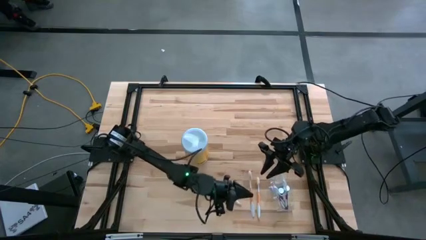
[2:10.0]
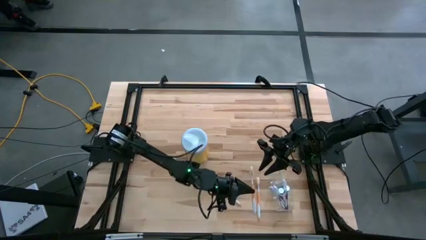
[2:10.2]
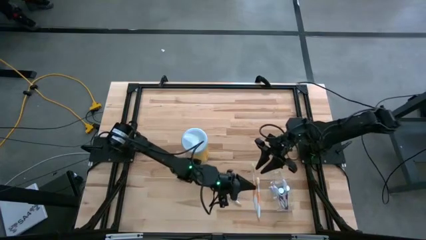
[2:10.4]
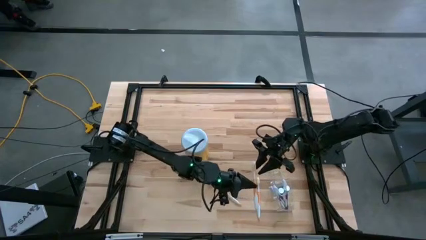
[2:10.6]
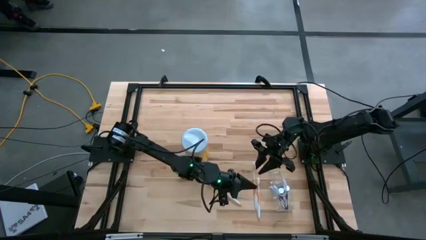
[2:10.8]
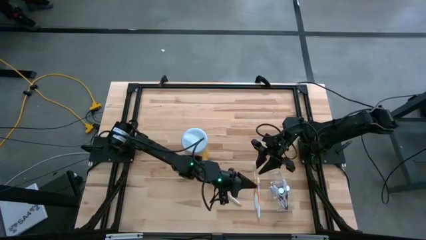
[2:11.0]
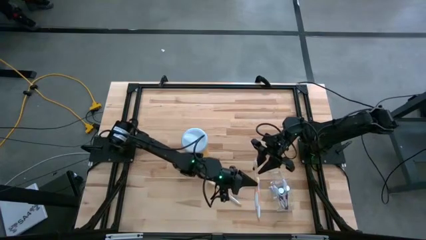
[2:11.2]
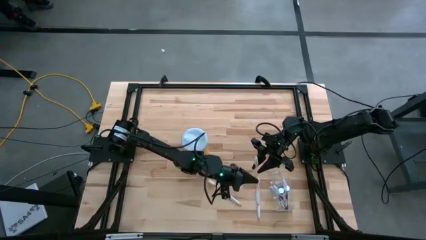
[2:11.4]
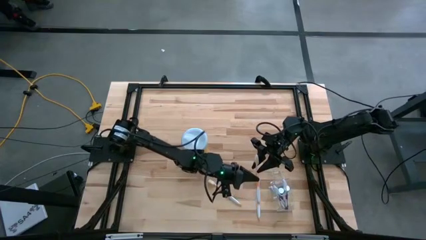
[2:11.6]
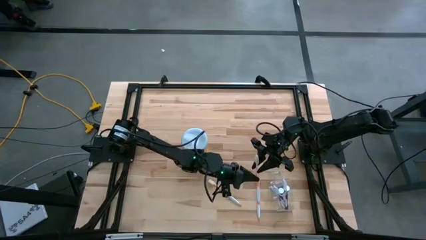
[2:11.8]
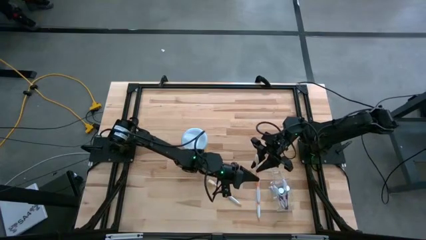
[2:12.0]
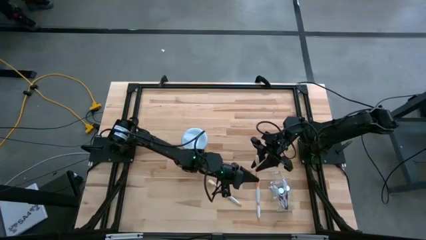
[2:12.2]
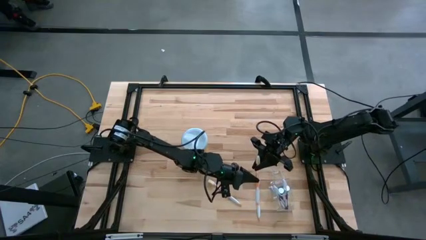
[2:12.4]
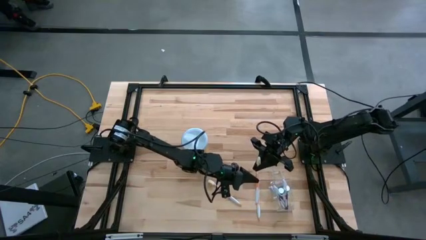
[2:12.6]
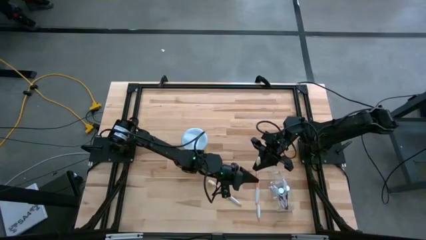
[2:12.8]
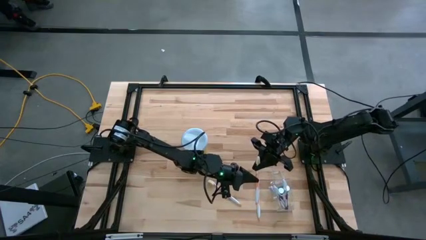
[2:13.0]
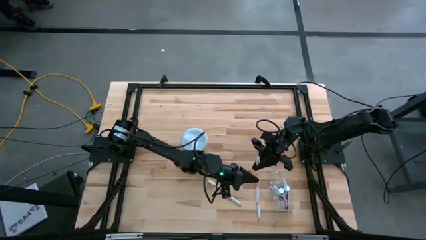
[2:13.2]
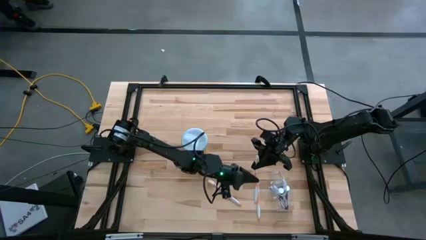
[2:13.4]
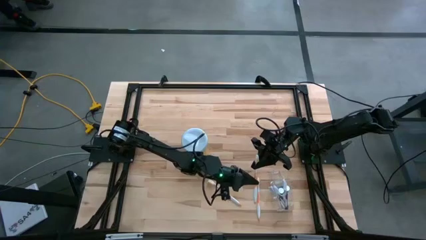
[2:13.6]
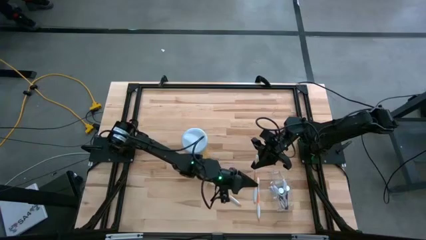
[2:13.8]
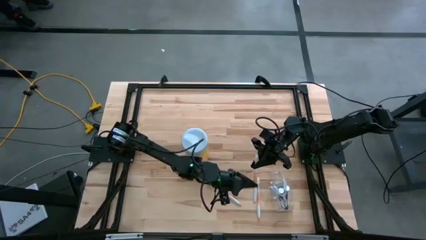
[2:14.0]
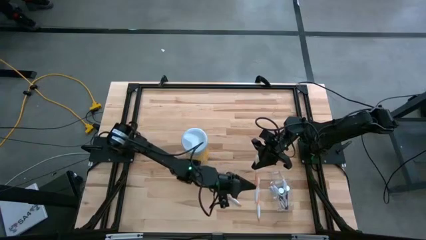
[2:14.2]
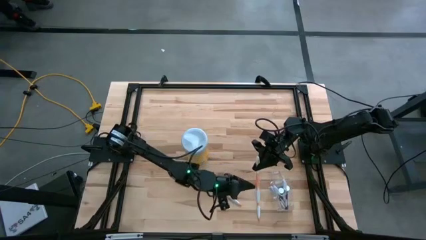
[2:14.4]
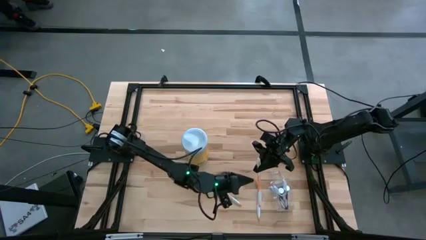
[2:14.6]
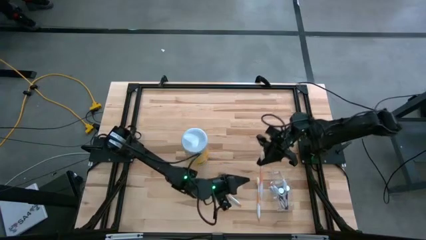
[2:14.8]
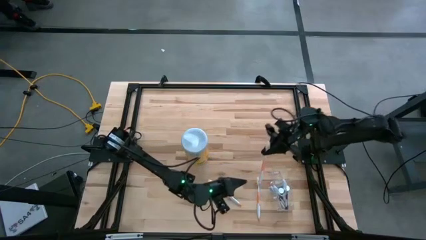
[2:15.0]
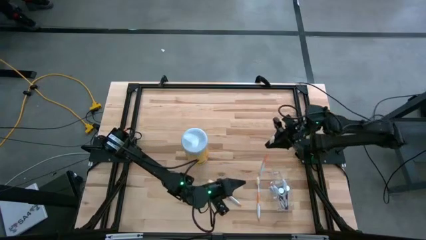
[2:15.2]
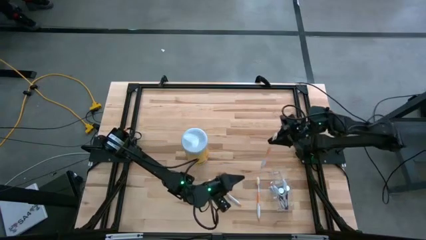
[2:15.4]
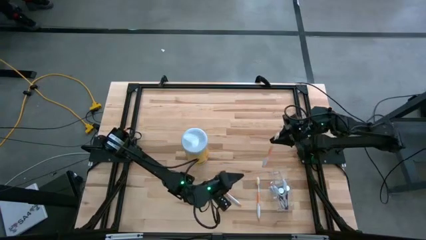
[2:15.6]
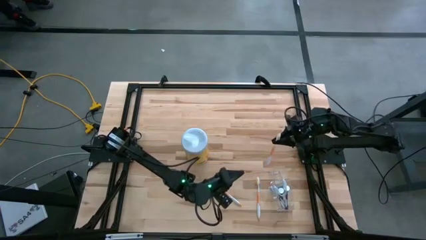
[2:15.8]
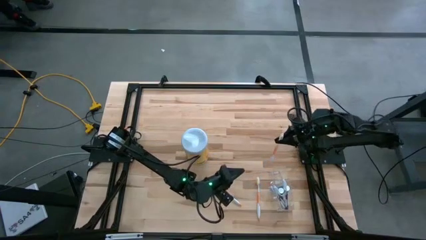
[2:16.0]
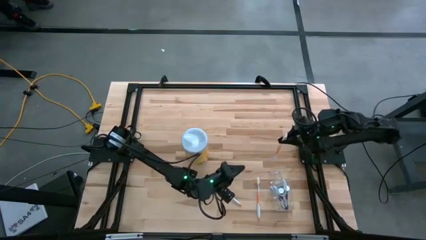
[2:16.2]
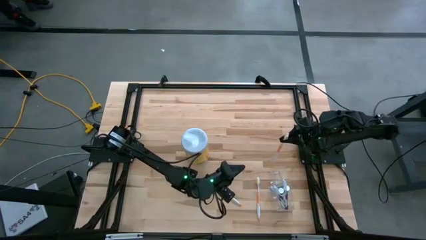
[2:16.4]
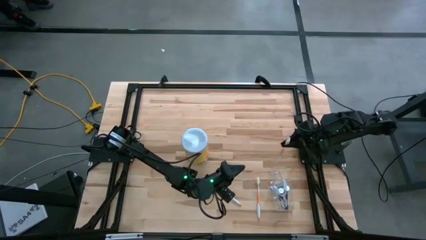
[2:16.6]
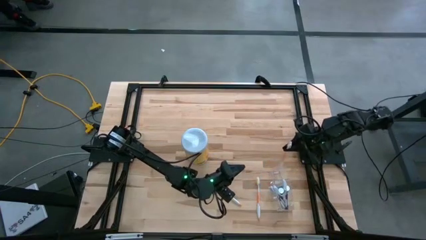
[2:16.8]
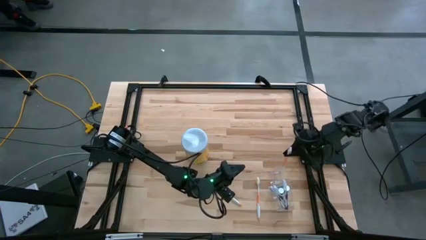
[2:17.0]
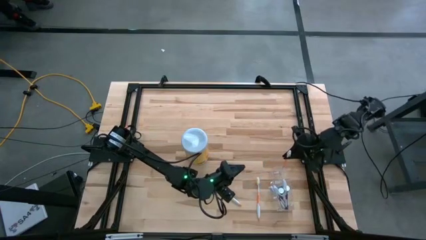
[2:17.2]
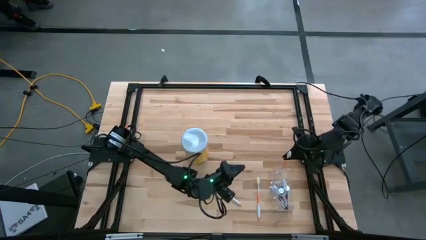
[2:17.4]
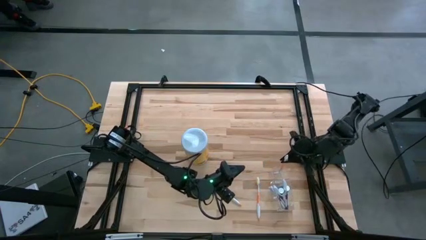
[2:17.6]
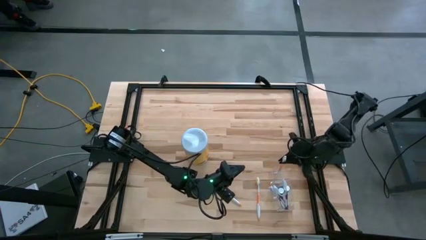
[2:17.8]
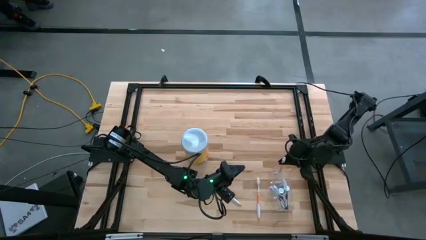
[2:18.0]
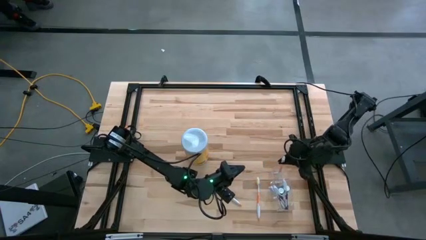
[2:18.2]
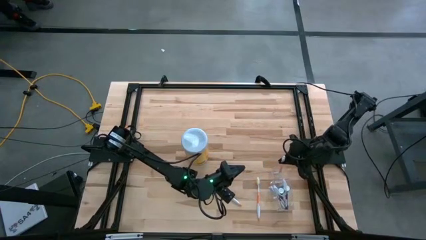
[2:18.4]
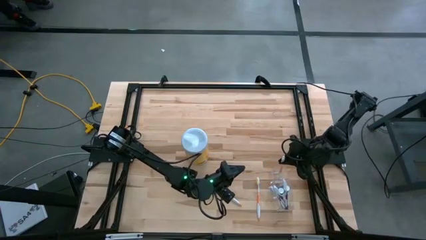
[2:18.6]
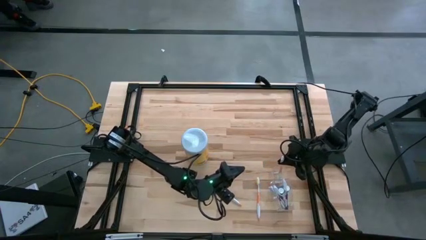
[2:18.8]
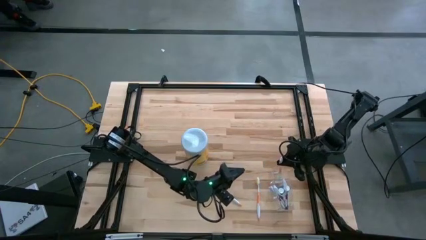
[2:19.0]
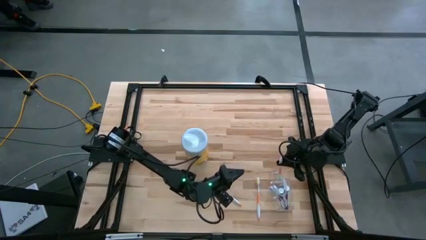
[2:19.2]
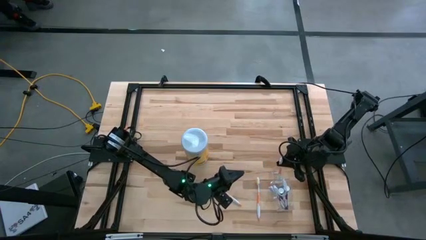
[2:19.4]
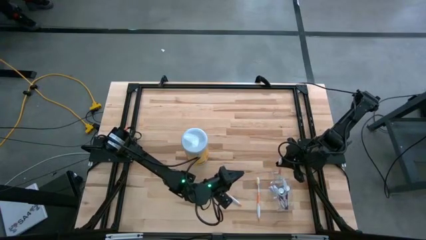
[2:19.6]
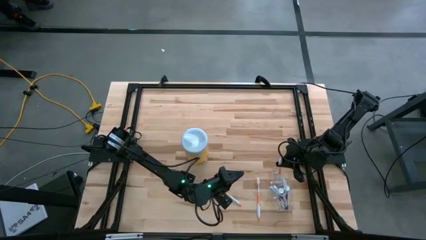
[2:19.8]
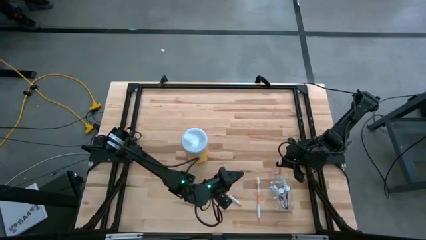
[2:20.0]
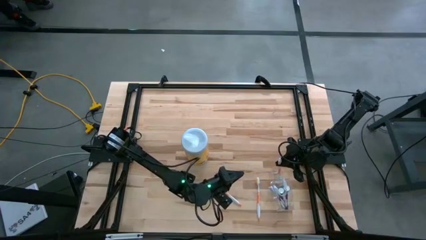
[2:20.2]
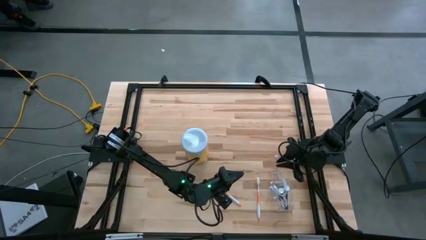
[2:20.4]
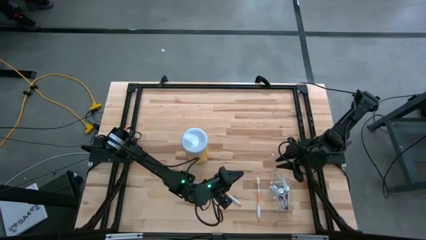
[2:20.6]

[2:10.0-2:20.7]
Task: Pick & Place toothbrushing station
Put the left orange toothbrush in the top section of the transparent organizer

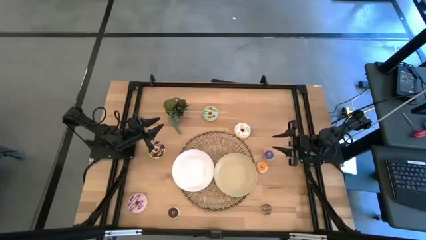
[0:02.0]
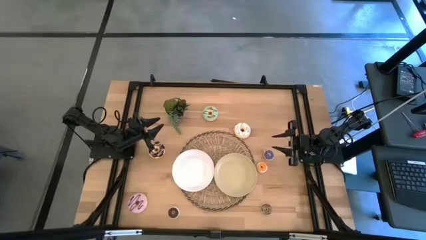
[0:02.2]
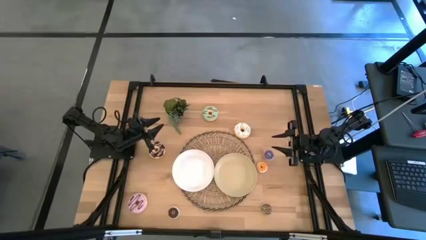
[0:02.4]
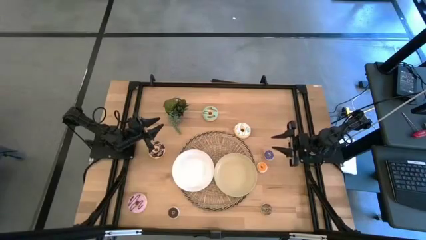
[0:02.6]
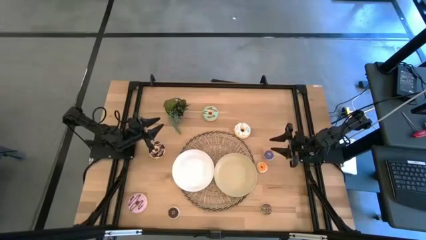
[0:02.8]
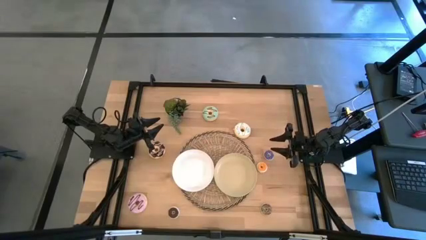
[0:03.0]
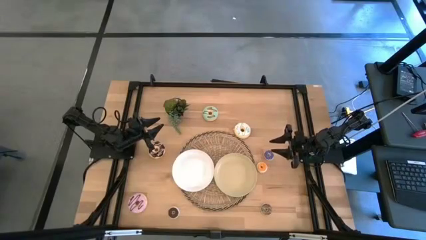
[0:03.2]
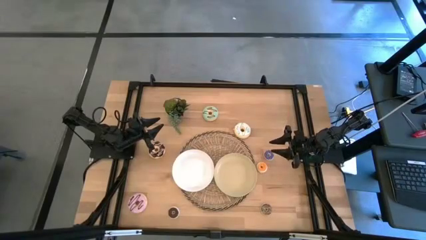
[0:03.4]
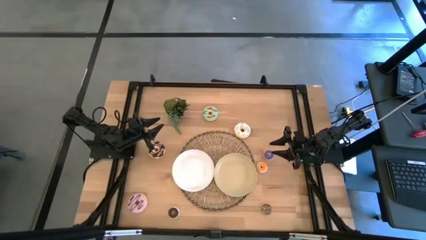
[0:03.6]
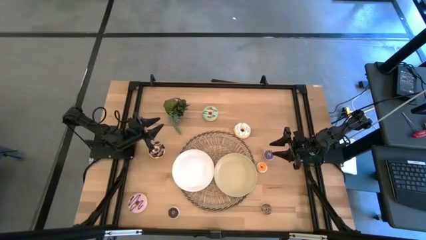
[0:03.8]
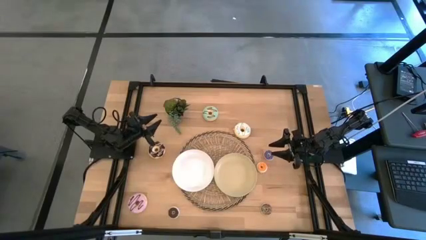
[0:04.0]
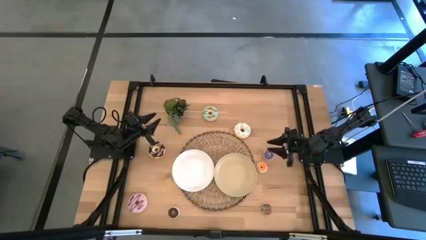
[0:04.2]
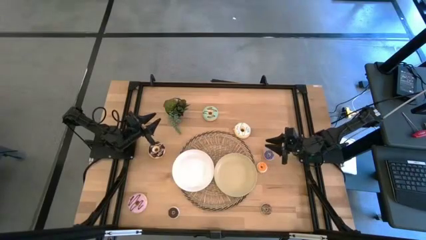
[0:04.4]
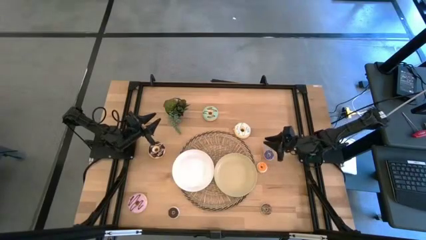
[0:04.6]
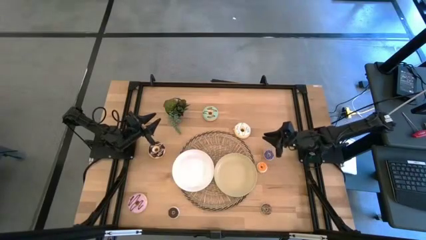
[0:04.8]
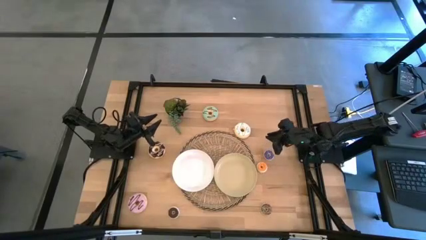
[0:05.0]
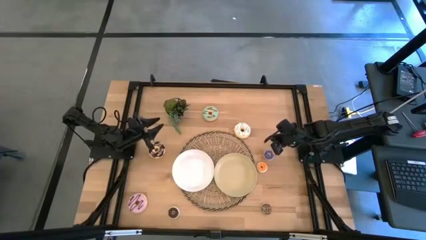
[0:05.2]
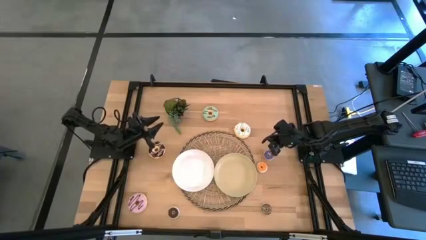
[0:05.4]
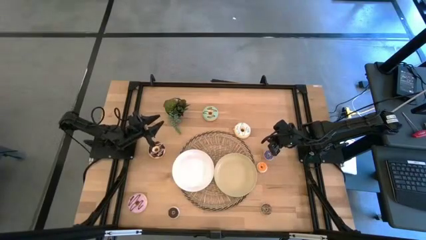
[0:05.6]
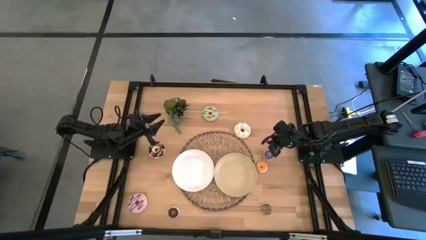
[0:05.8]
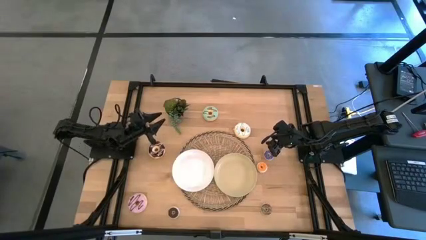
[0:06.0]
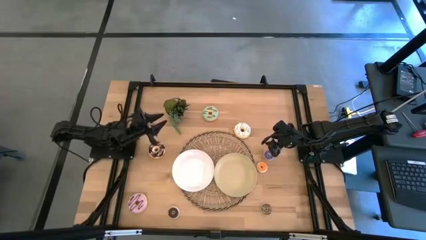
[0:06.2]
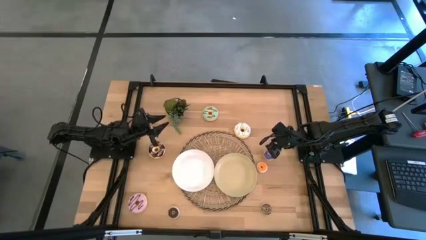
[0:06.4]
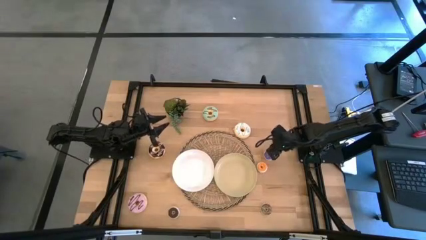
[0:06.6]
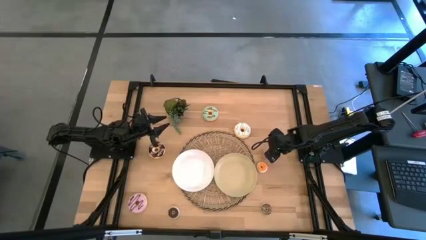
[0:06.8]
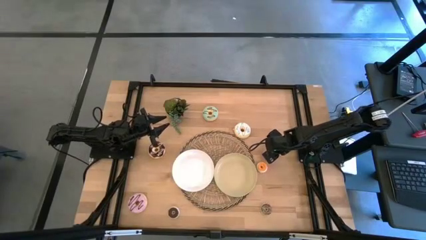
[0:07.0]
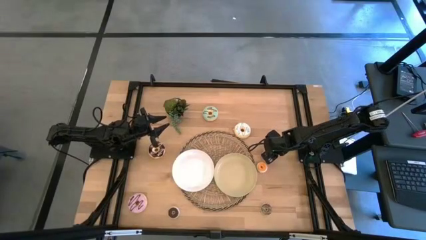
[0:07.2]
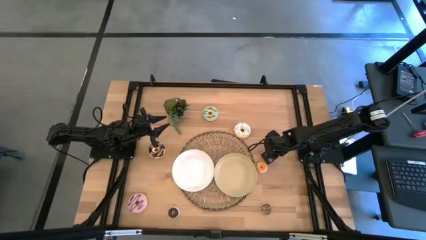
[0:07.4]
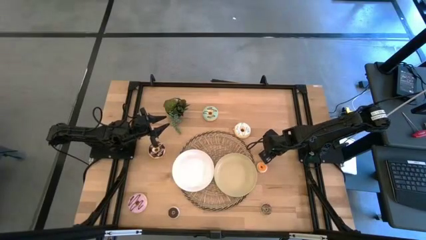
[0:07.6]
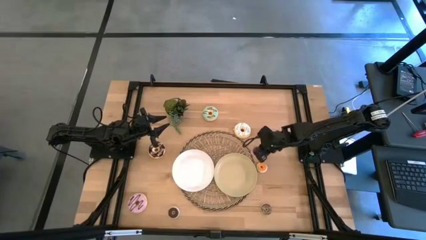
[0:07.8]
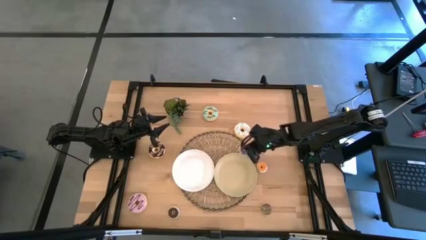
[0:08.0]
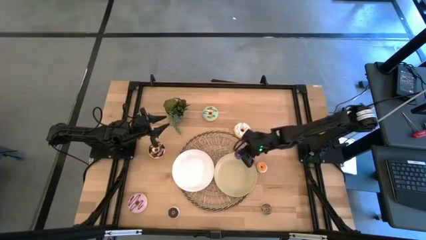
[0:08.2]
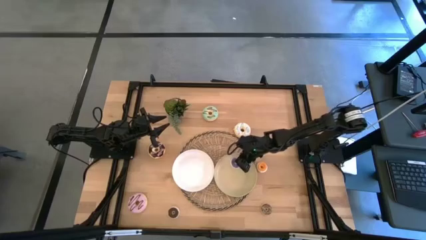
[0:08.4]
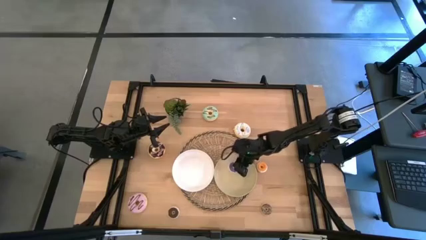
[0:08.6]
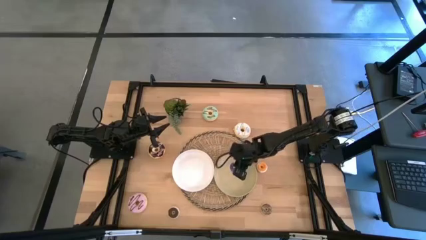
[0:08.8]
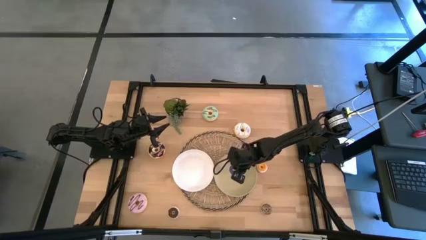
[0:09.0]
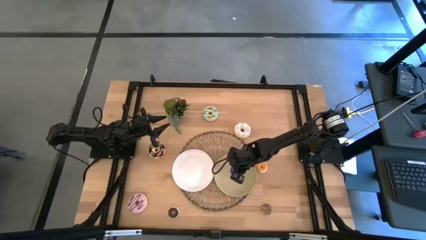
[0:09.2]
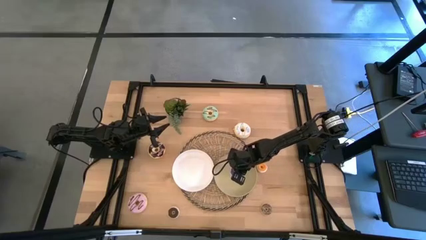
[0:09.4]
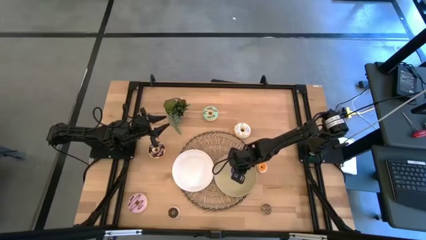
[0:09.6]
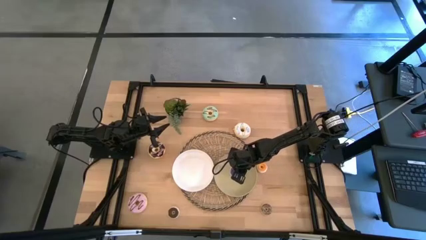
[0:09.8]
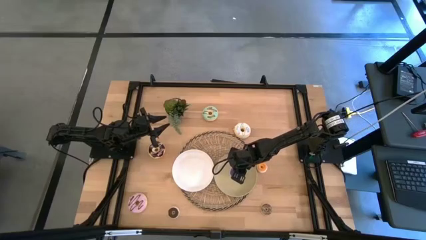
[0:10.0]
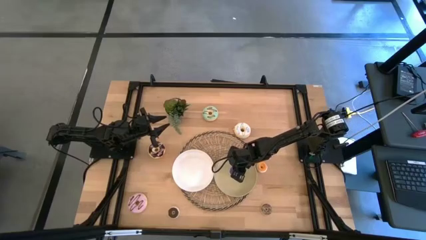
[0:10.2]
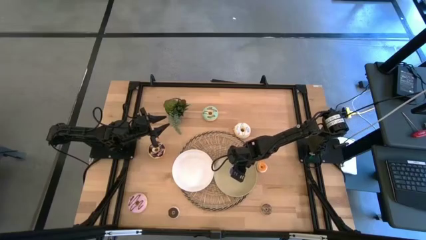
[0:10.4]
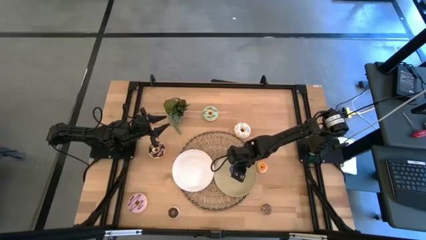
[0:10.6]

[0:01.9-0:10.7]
Task: Pick & Place donuts
Put the small purple donut on the brown plate
